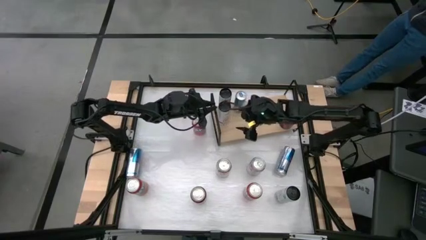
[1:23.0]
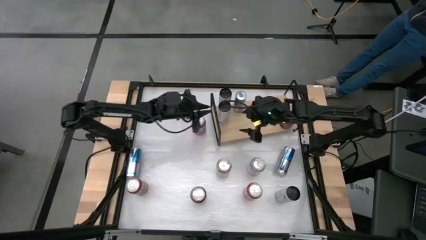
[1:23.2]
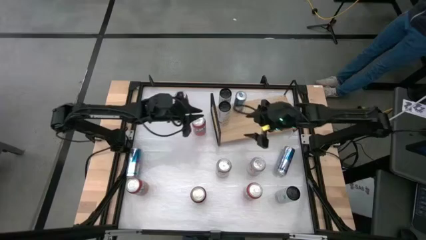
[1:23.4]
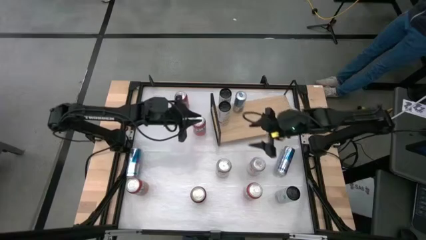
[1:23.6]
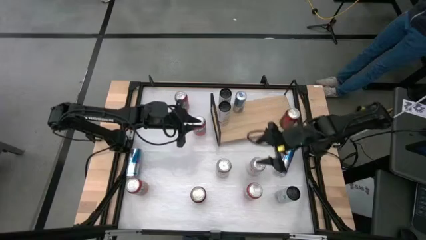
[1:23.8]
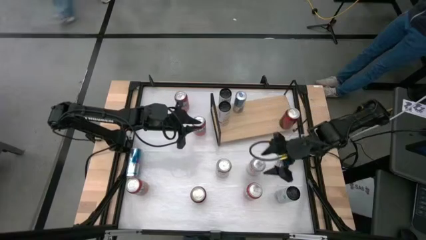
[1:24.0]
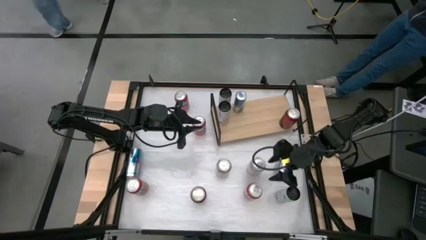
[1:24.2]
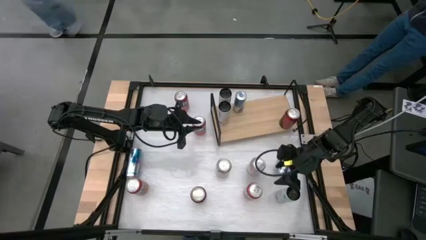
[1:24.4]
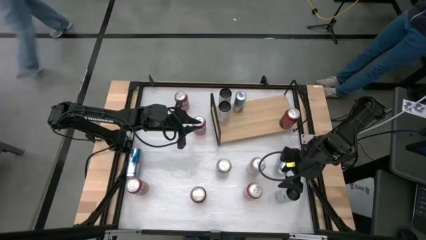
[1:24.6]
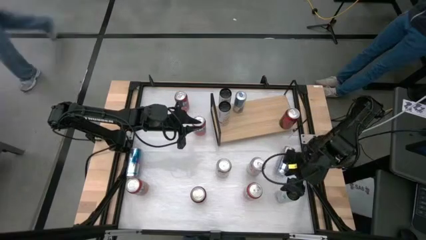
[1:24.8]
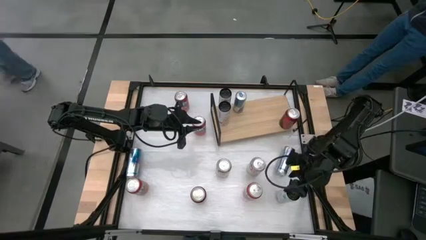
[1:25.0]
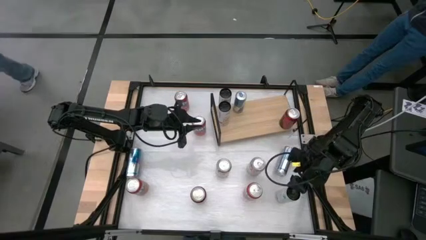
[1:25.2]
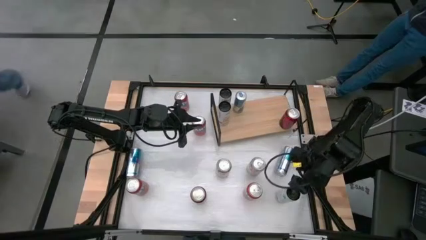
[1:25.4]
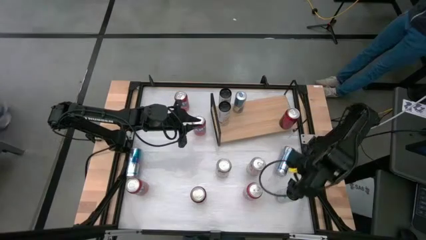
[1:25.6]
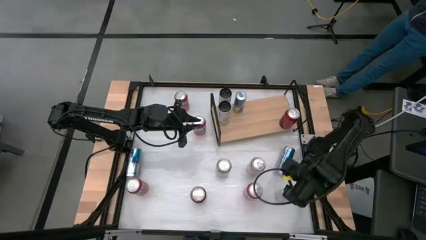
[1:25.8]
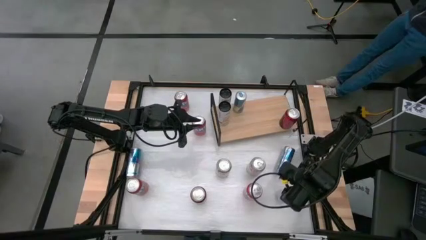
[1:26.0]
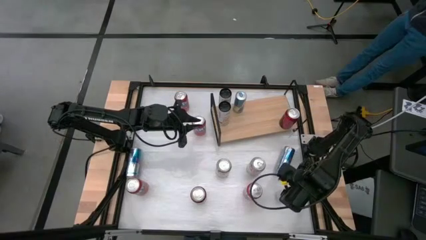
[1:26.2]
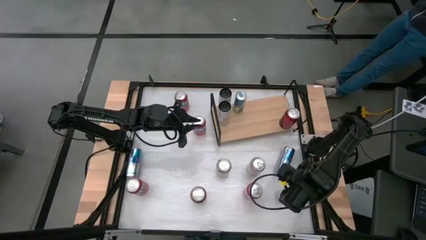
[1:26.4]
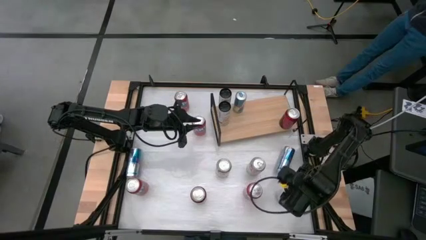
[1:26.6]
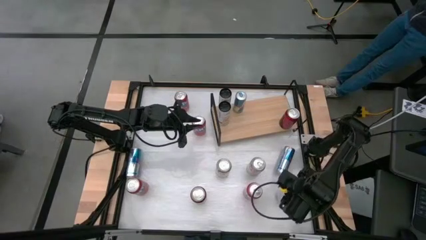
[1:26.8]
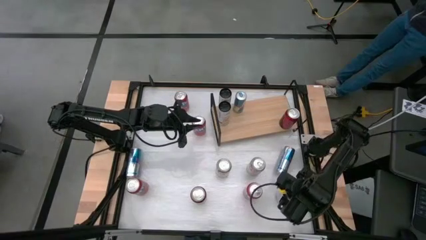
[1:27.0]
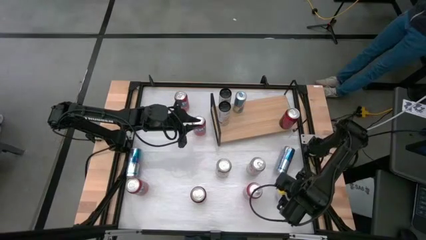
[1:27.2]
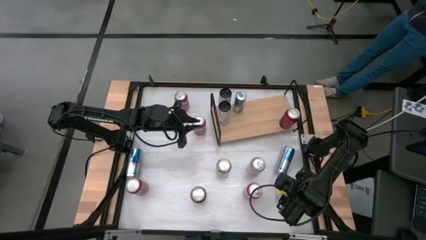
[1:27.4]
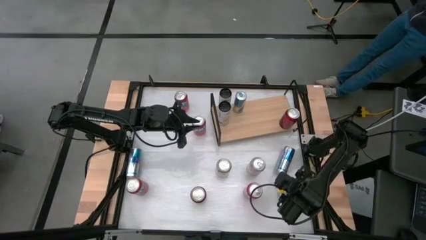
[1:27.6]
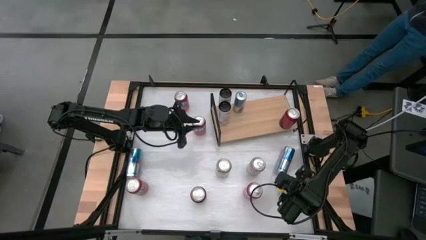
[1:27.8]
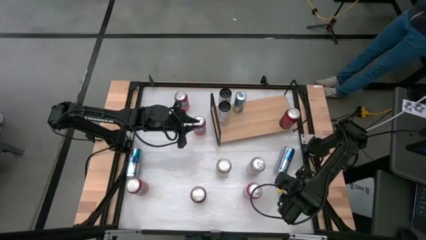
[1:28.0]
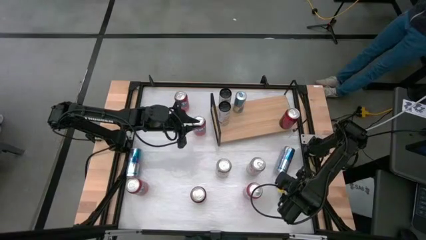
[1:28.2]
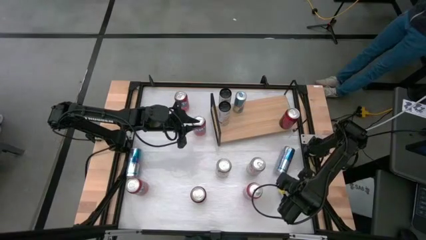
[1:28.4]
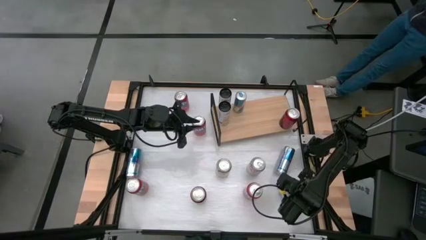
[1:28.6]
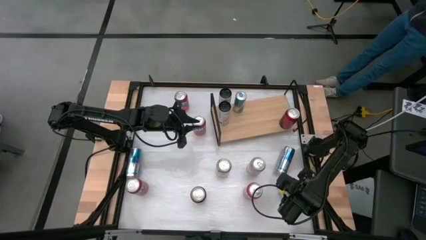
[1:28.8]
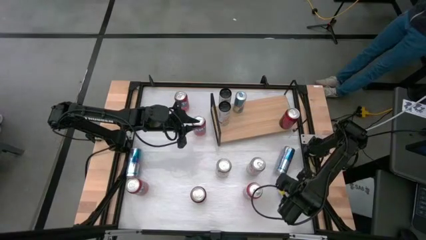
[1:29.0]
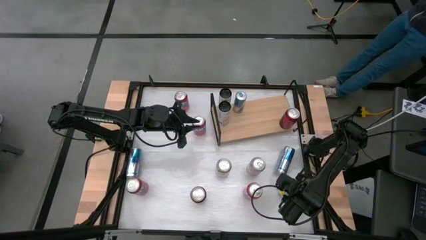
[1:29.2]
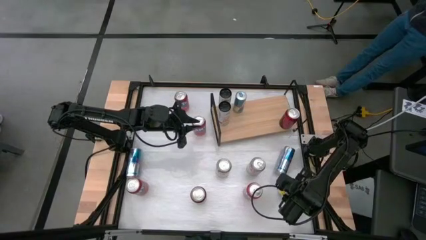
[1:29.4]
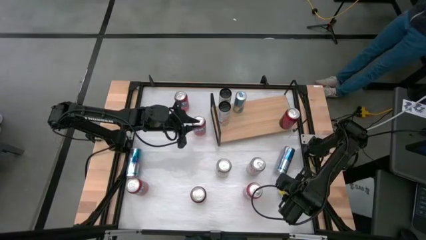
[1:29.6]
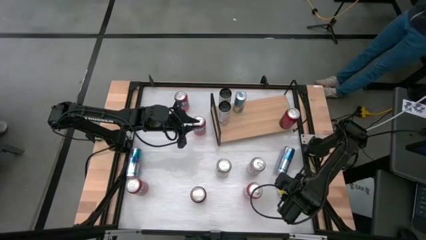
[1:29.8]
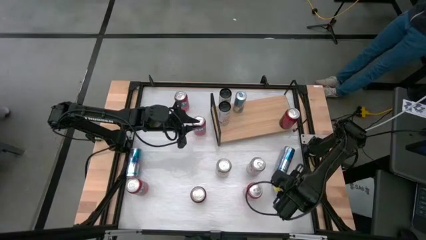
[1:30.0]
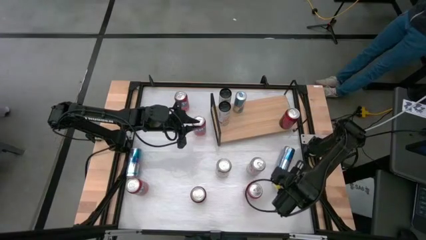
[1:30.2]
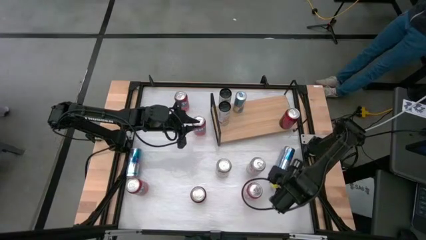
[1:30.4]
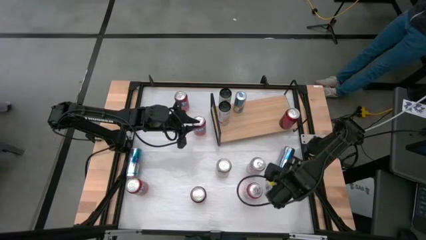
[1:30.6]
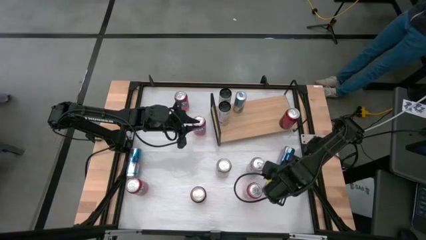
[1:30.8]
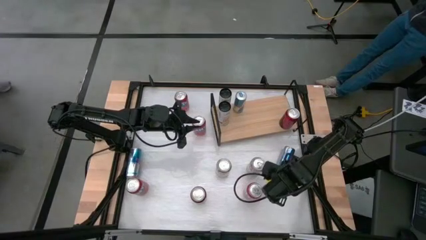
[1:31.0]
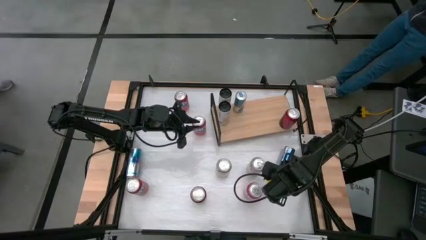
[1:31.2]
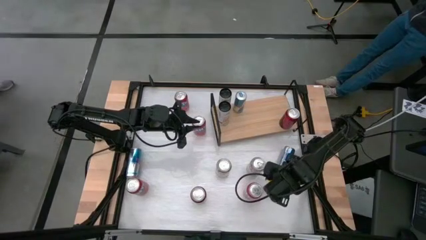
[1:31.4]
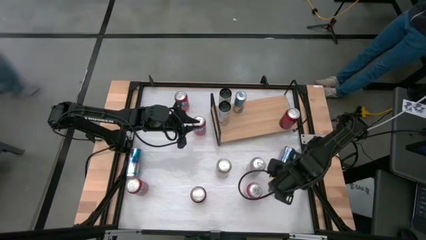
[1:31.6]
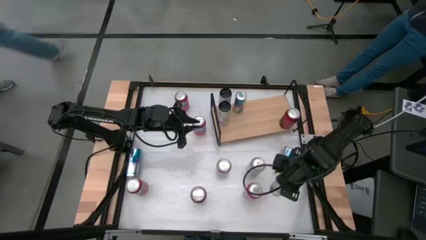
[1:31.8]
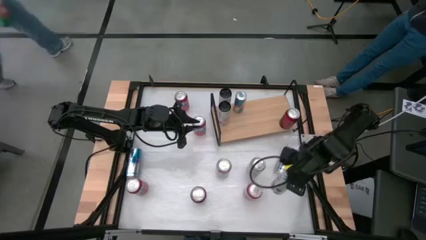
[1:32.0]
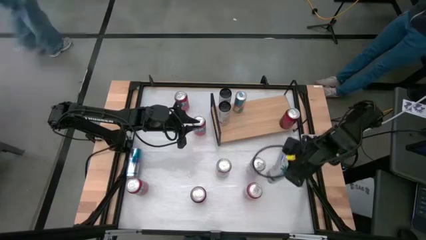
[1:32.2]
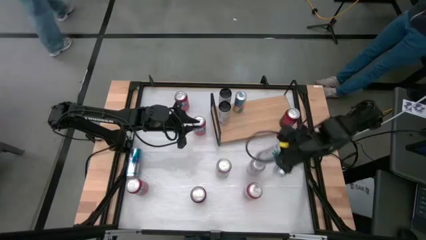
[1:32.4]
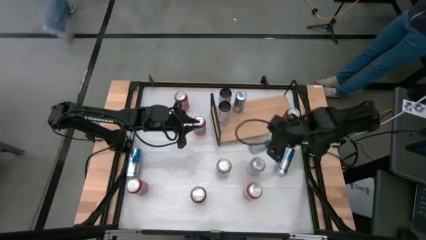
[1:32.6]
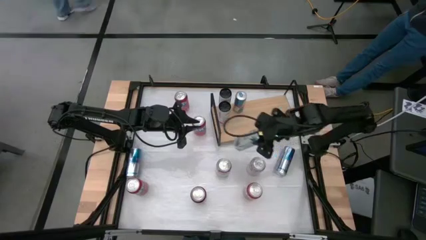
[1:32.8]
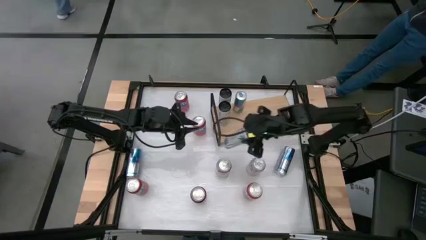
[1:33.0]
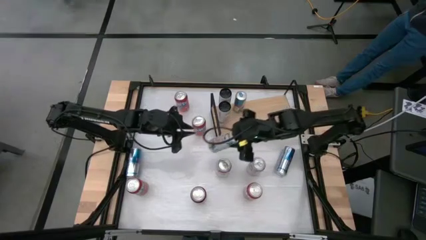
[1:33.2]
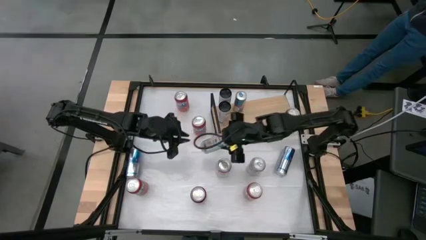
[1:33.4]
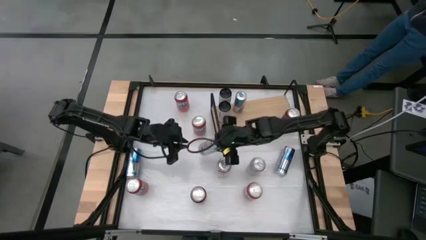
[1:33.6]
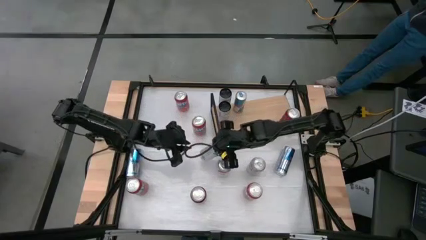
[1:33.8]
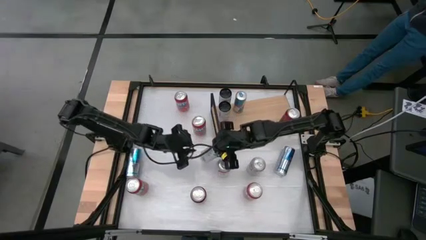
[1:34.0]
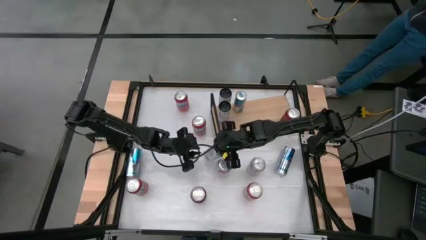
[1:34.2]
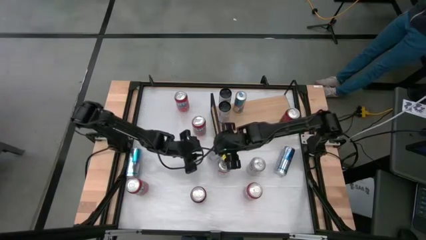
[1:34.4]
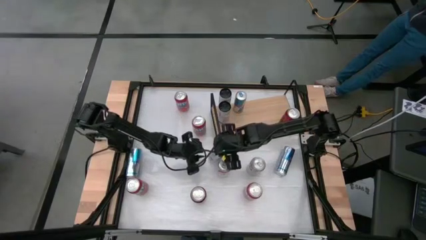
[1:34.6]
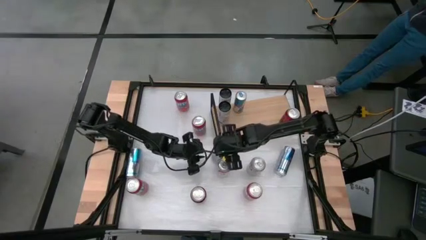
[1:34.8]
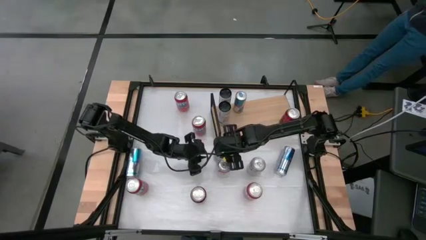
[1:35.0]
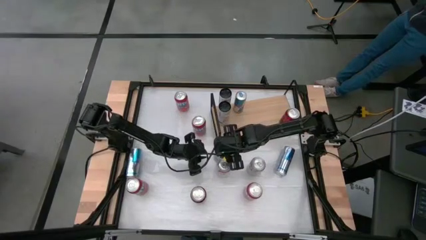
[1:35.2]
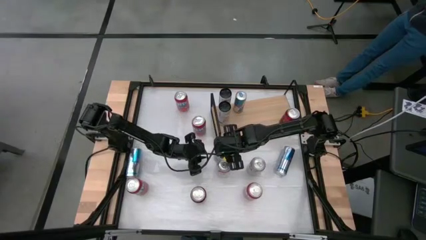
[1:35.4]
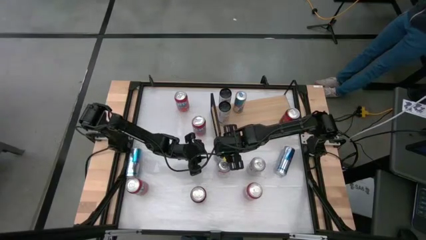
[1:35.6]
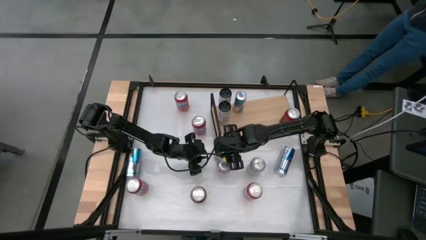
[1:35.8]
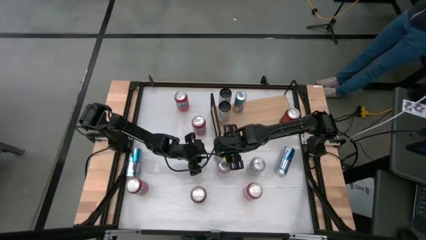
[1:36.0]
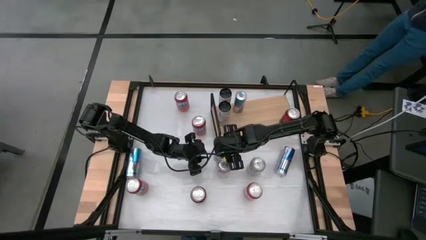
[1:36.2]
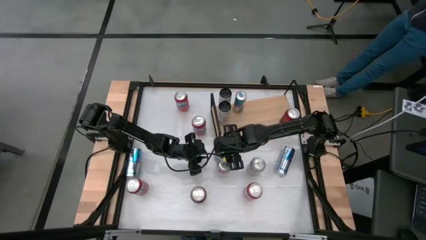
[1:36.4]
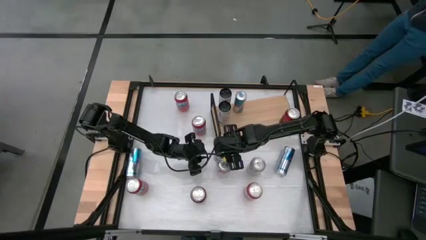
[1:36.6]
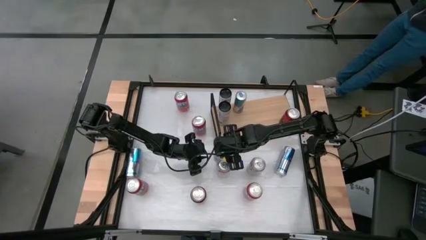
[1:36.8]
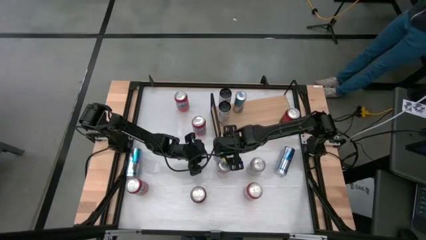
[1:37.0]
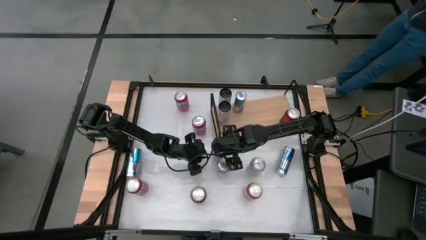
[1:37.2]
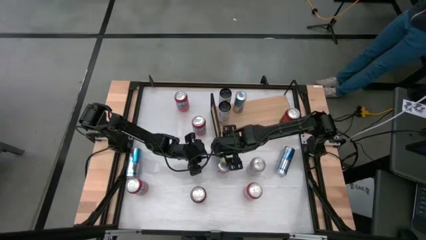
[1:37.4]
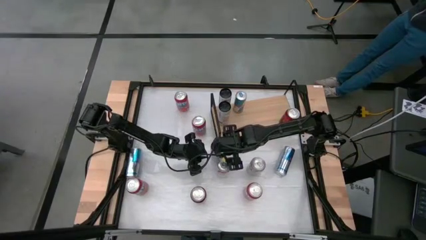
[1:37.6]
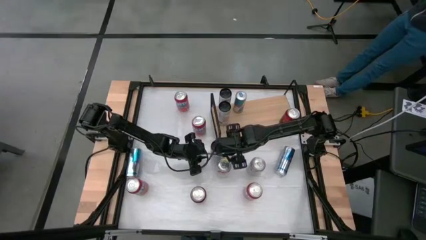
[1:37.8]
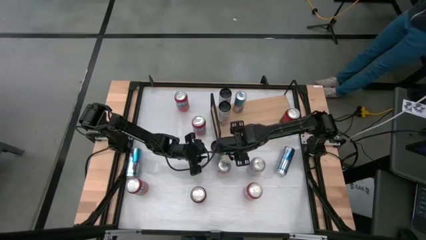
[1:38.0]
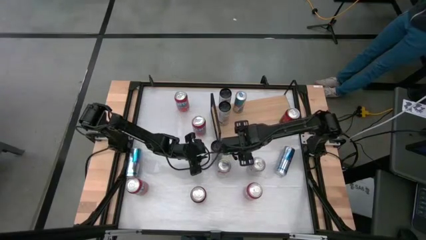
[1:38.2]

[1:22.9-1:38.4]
Task: Place canned beverage on shelf
Put the white black soda can on the shelf aligned with the other white black soda cans

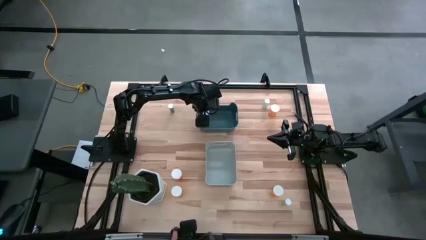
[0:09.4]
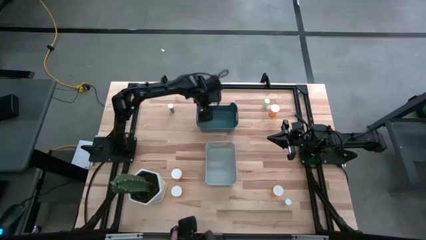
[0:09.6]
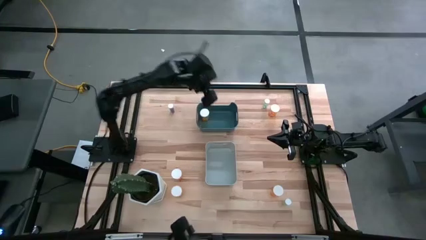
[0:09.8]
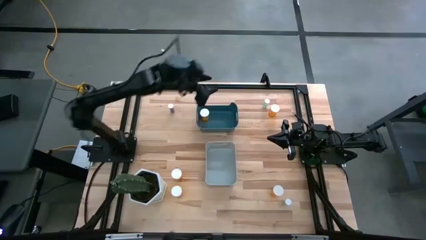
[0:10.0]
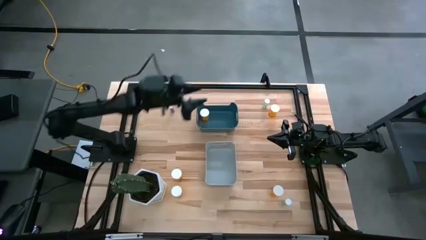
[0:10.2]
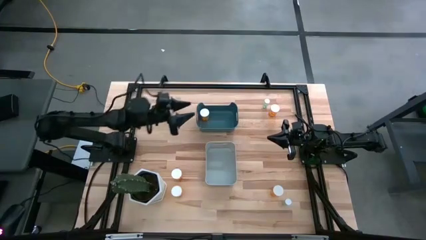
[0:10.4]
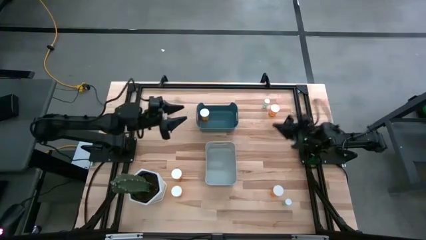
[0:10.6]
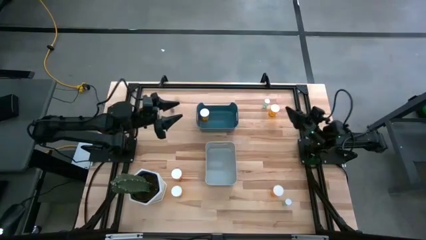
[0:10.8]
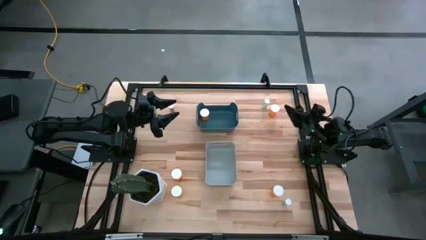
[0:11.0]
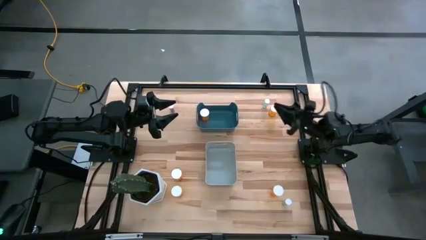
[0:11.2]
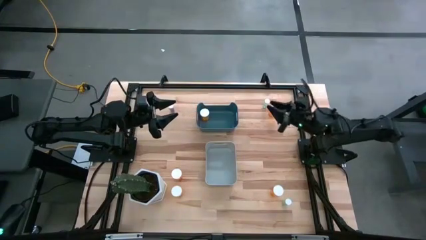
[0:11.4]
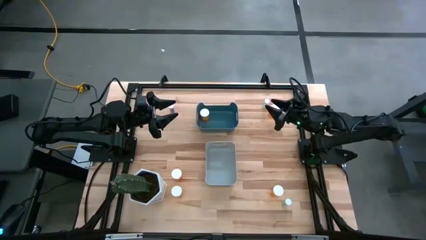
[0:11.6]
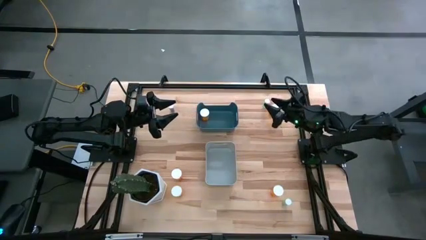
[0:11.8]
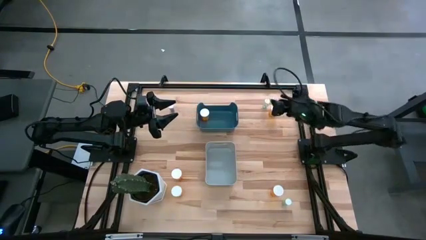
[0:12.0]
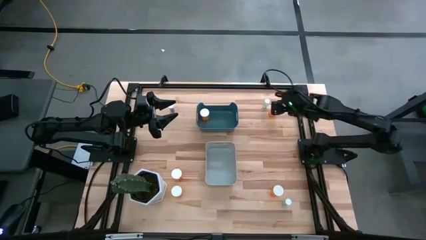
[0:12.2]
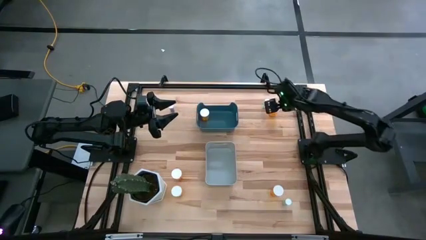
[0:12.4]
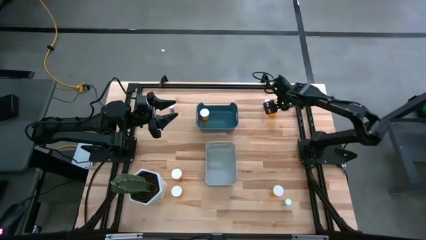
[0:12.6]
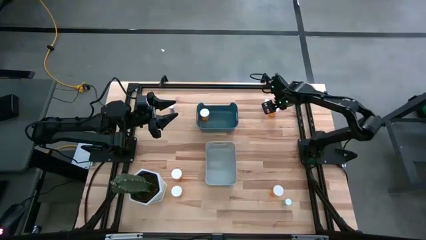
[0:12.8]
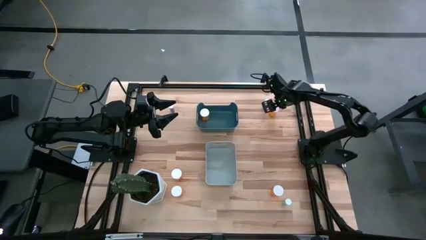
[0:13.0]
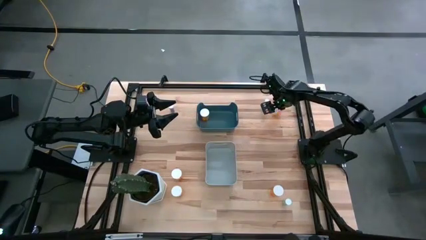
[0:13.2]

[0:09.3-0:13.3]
Task: Pick and place medicine bottles into bin by pill shape (circle, oval)
Put the orange capsule bottle into the blue bin
